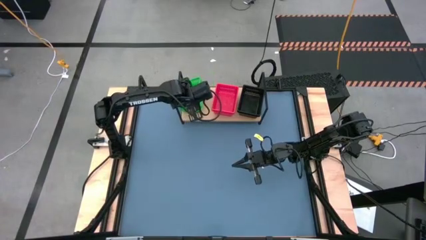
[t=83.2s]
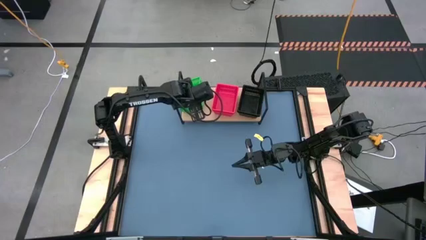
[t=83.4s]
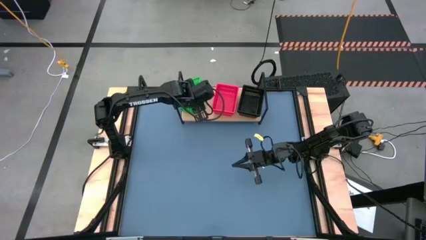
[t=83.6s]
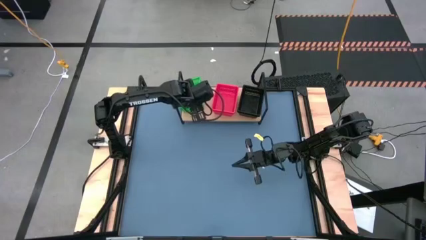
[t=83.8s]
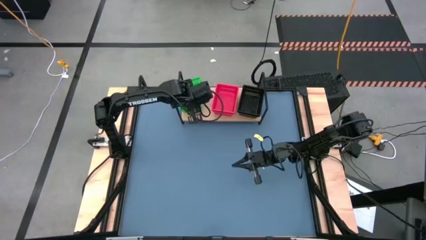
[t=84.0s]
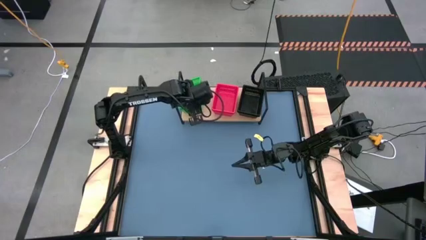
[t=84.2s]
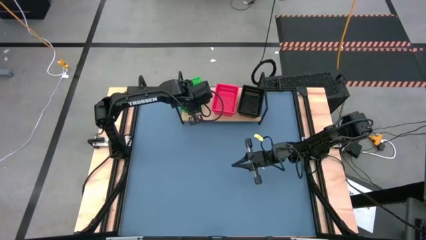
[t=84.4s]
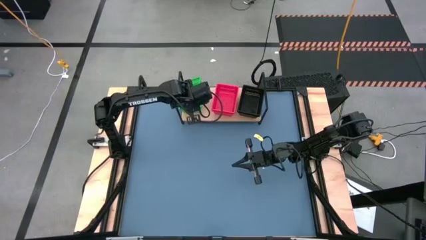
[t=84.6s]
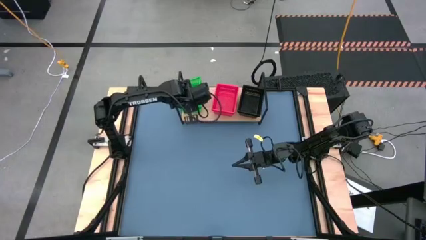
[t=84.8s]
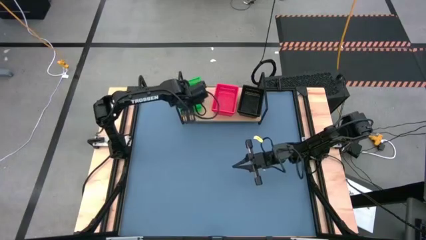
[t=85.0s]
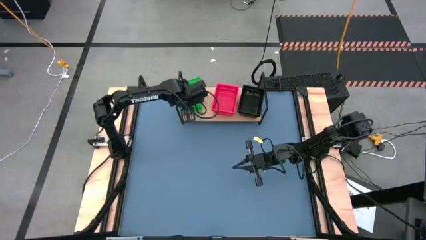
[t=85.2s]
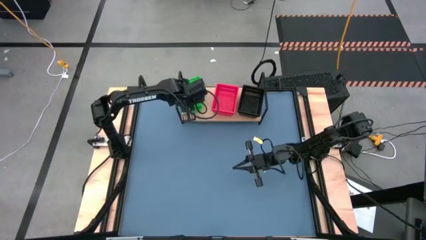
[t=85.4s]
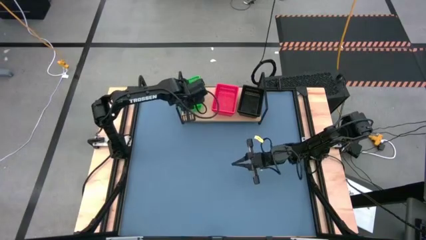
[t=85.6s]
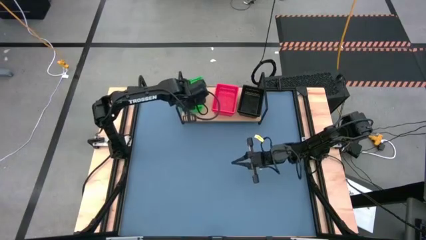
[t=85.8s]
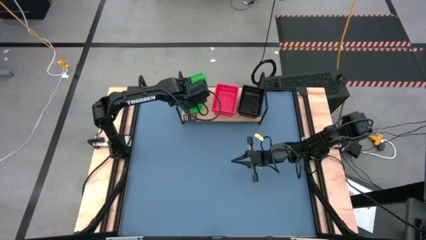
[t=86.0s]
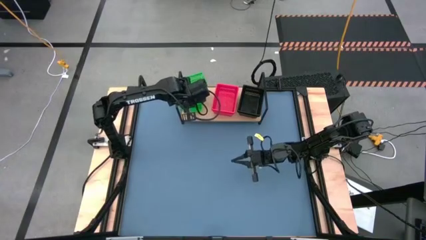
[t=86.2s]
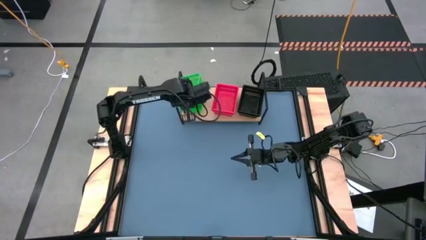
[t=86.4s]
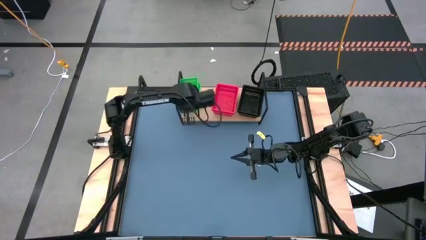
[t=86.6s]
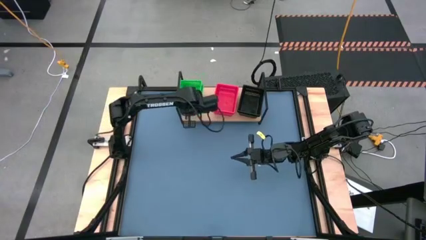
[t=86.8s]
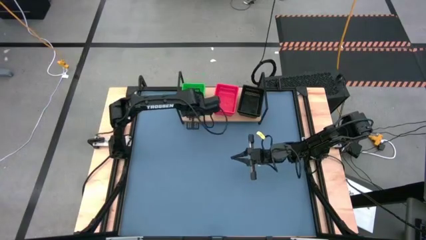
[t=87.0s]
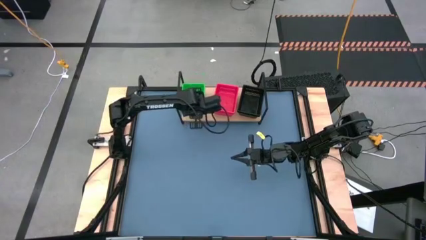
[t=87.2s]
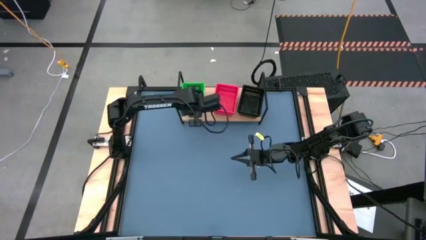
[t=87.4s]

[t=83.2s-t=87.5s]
Task: Stack baskets on shelf by color
Stack the green bin on the green bins on the shelf

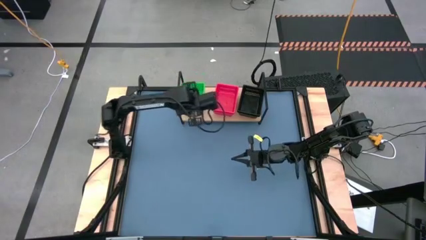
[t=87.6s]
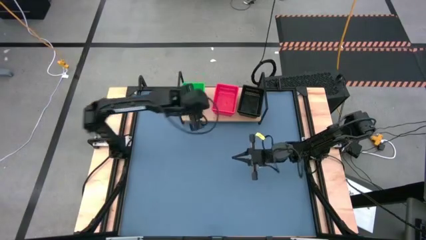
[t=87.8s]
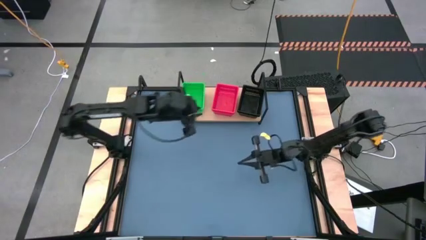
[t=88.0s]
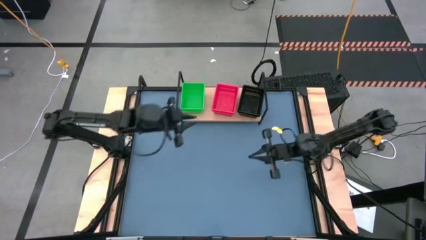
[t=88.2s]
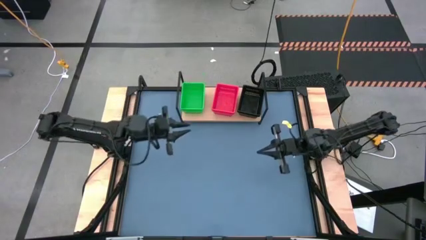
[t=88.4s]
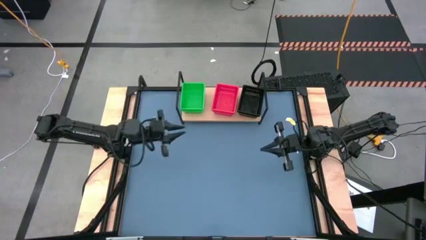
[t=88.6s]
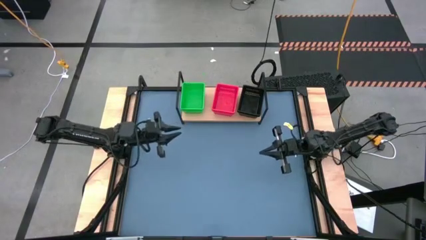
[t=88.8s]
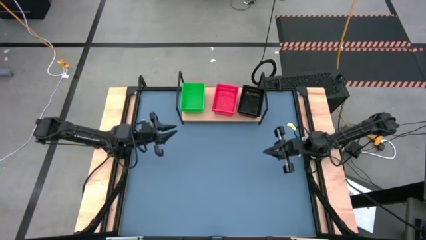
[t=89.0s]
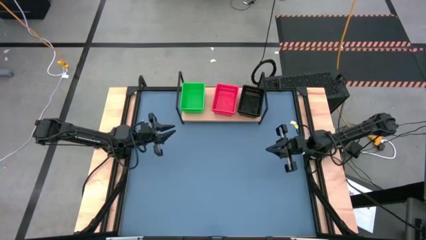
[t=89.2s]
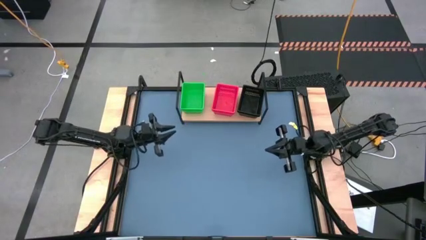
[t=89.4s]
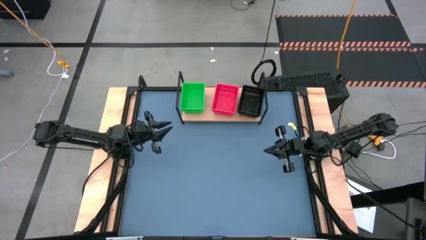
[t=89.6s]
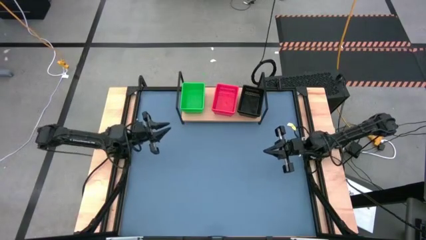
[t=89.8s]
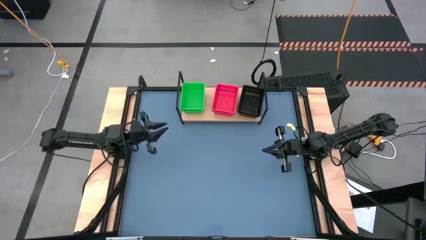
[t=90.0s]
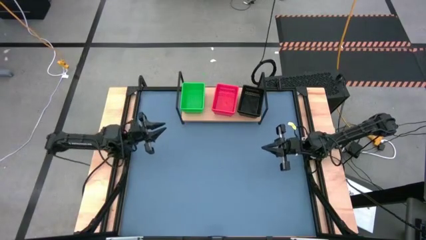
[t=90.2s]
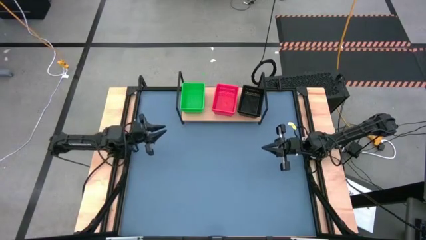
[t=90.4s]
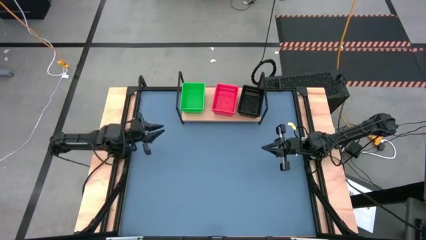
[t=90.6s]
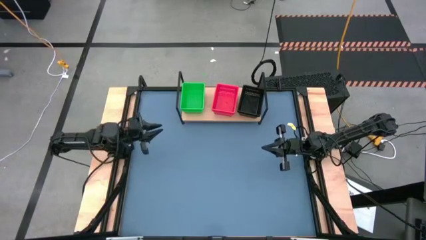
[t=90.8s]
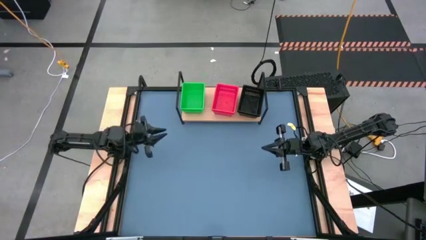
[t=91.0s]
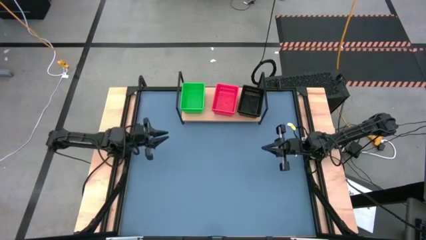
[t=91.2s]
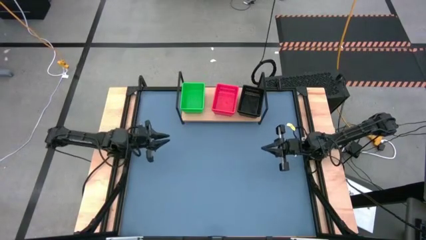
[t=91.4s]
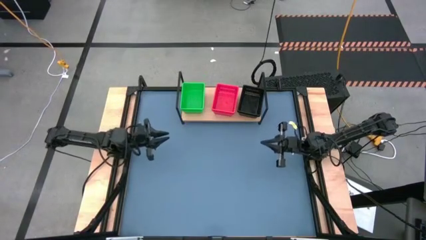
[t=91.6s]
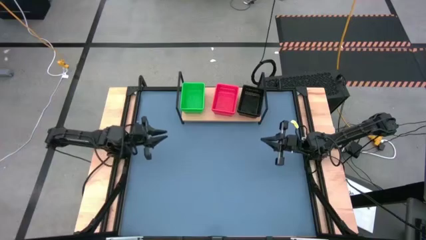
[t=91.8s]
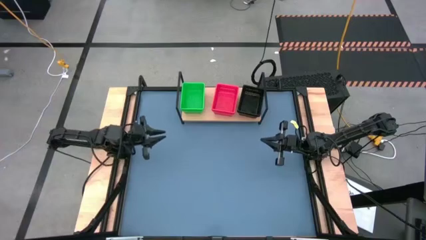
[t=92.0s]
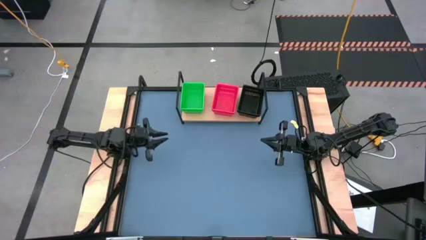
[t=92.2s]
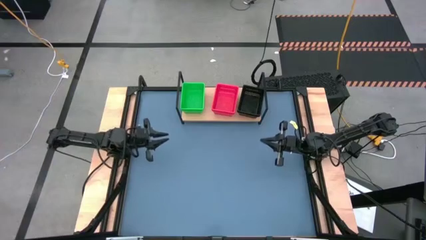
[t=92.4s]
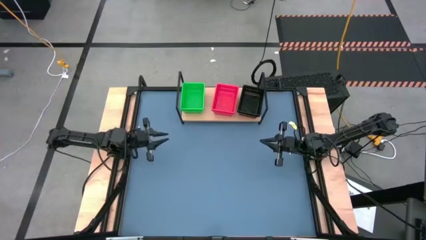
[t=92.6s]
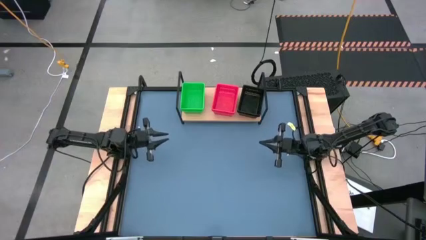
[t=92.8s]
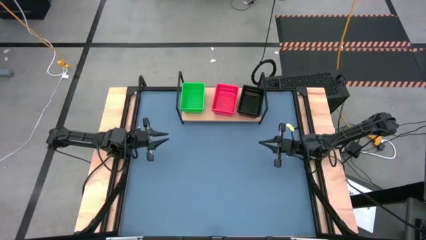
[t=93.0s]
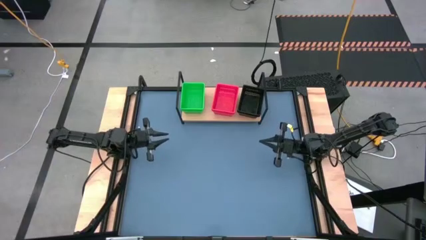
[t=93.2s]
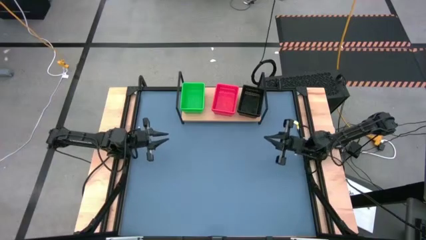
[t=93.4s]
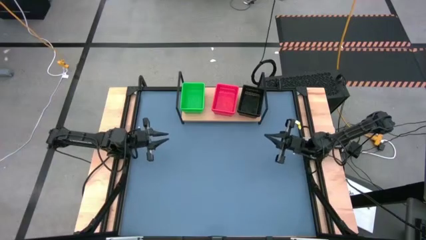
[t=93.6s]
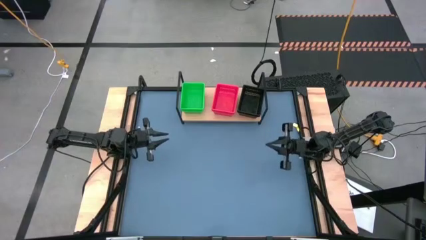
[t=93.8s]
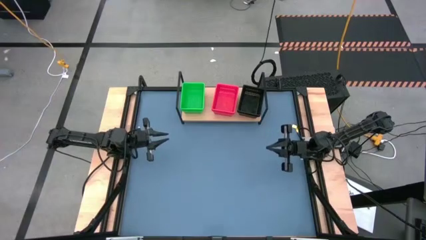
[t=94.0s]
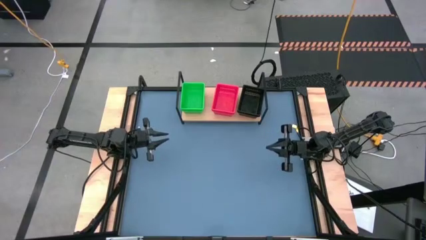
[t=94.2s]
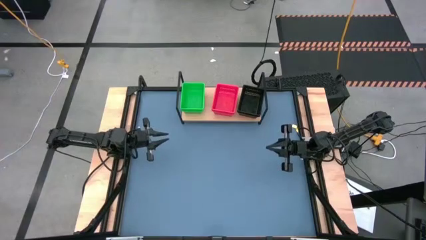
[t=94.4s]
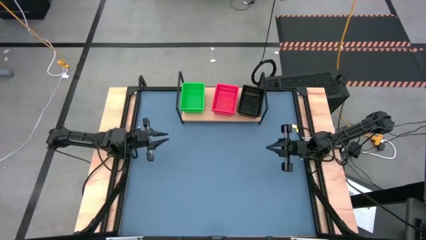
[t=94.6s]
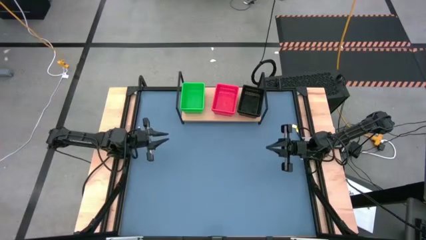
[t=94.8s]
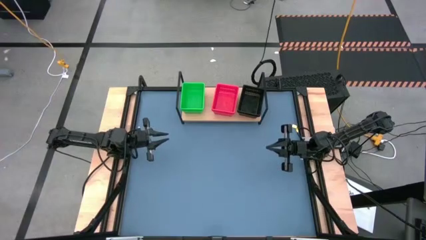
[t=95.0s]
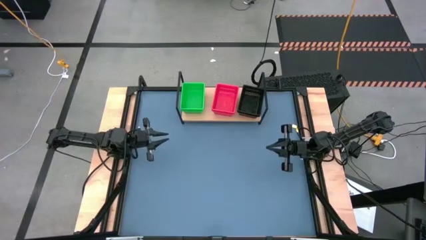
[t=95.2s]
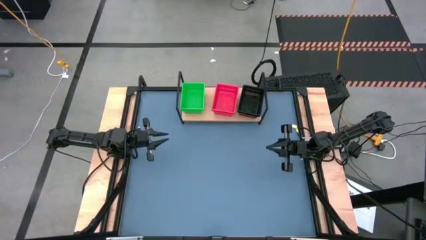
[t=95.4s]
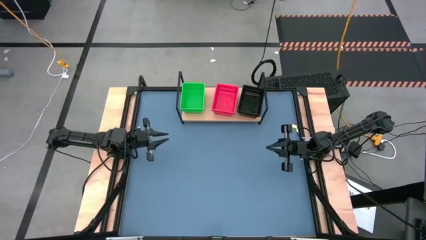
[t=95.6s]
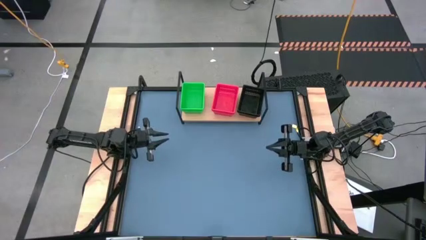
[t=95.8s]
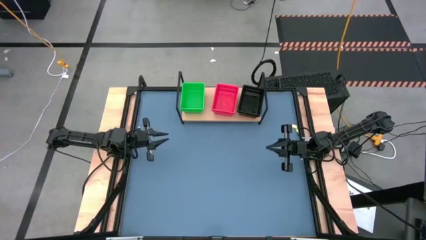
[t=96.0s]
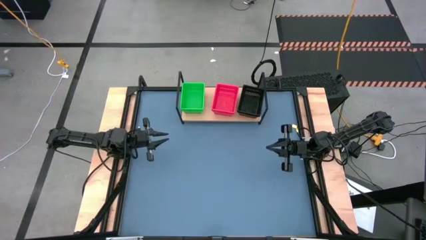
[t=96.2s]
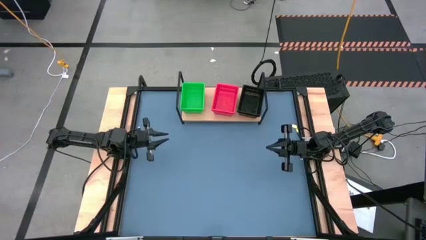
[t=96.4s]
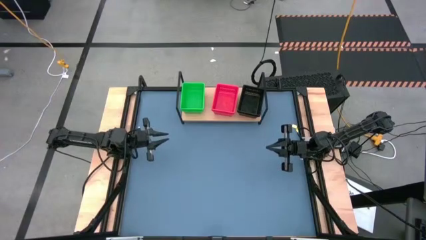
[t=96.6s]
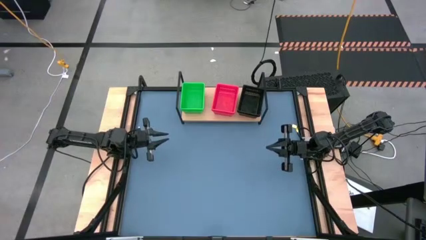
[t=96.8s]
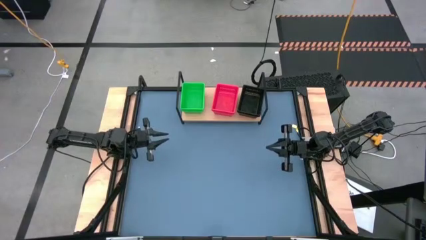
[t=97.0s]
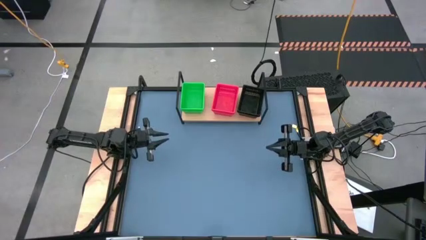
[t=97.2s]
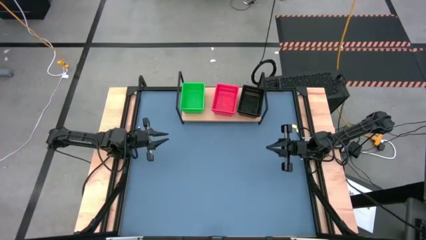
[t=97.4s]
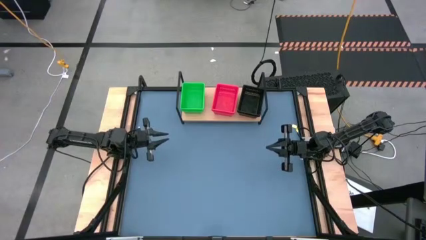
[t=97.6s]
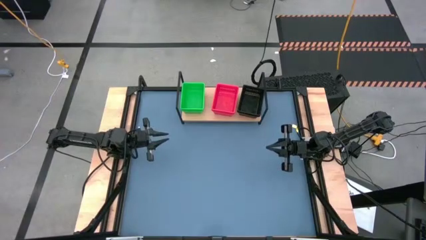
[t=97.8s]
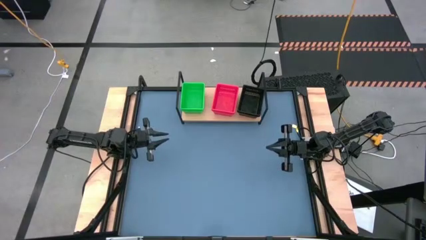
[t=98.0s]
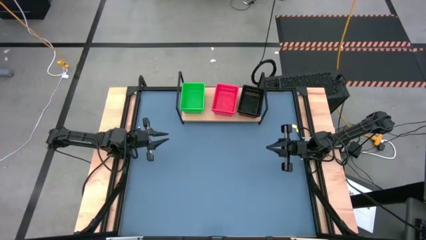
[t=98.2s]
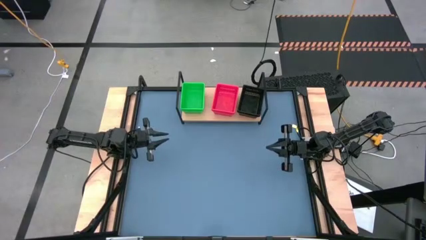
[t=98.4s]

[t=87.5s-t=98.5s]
Return to Home Position
